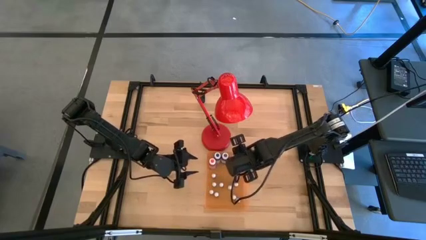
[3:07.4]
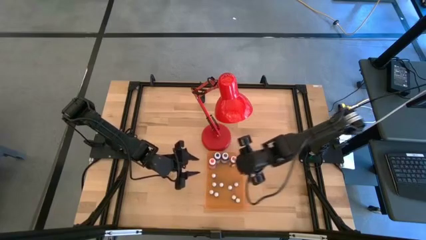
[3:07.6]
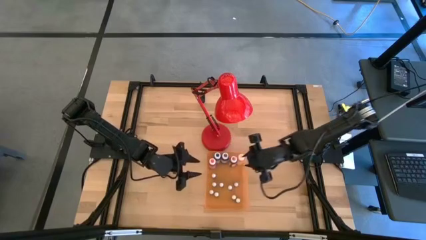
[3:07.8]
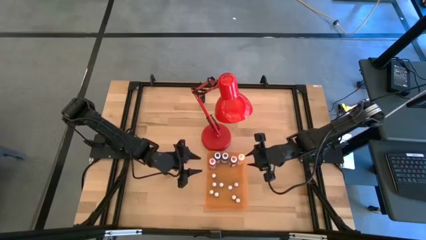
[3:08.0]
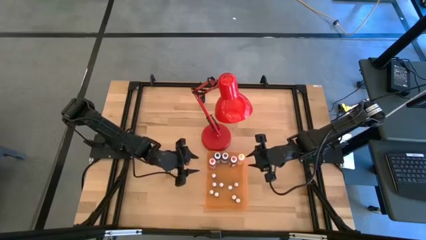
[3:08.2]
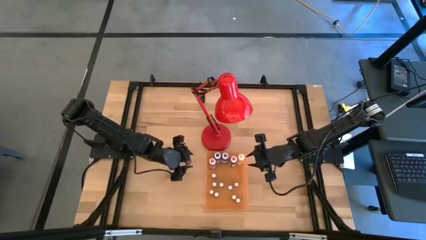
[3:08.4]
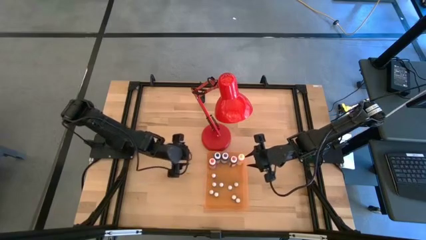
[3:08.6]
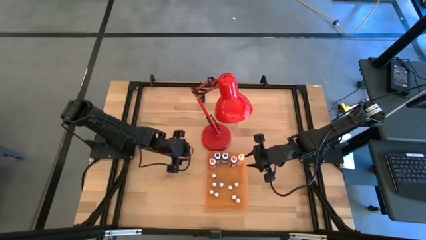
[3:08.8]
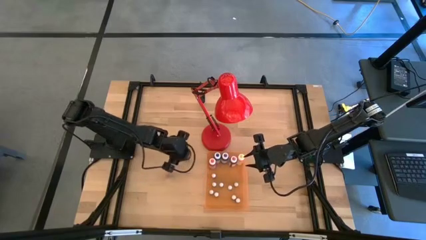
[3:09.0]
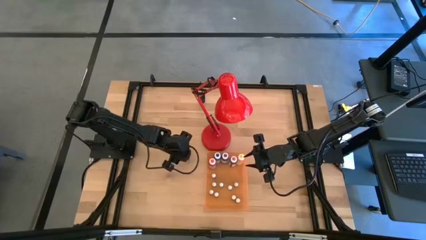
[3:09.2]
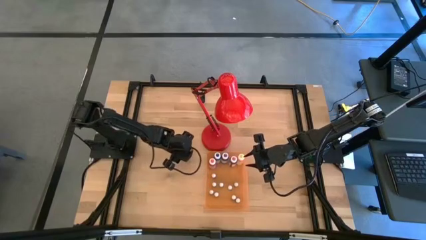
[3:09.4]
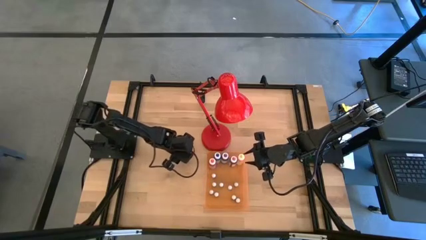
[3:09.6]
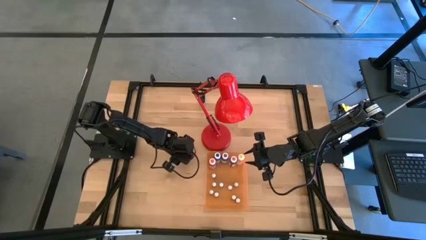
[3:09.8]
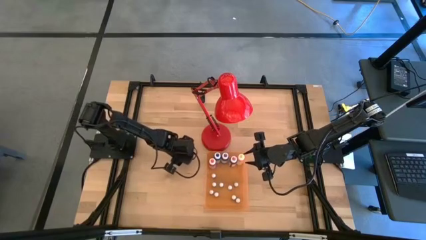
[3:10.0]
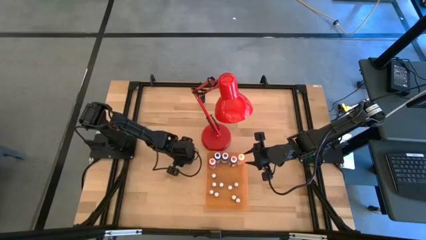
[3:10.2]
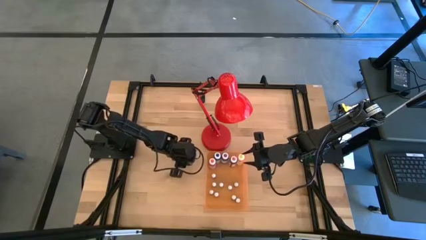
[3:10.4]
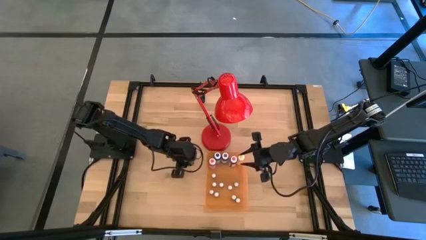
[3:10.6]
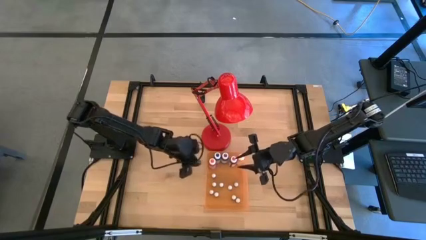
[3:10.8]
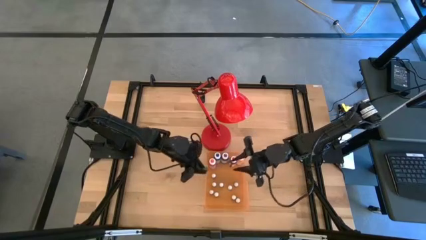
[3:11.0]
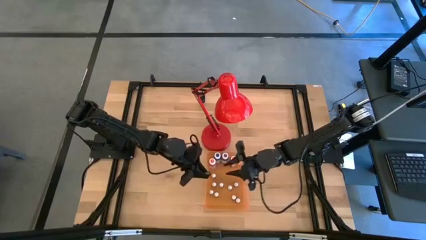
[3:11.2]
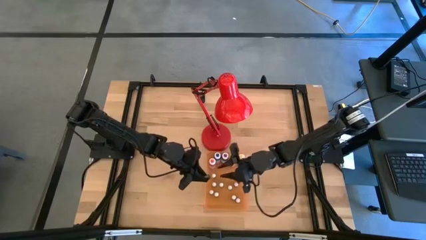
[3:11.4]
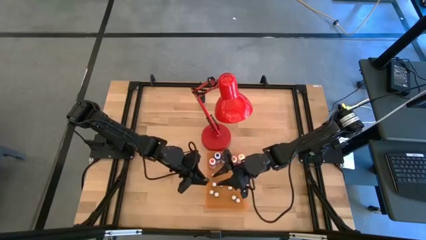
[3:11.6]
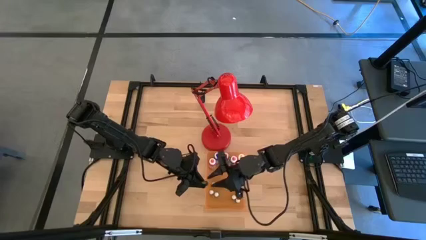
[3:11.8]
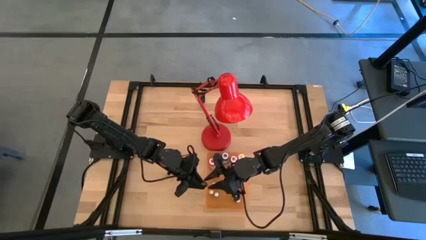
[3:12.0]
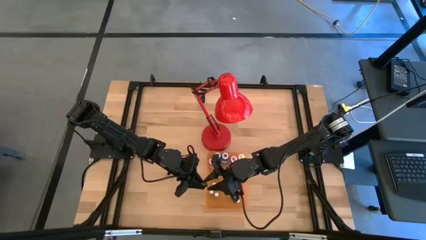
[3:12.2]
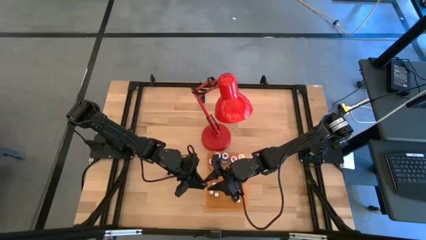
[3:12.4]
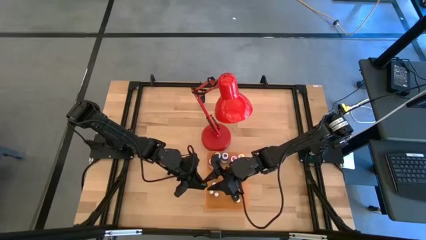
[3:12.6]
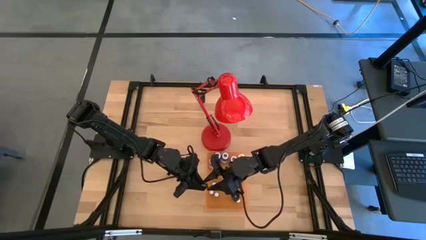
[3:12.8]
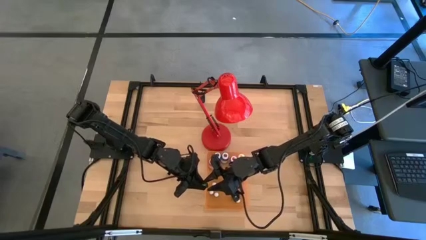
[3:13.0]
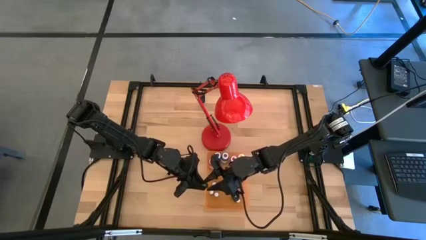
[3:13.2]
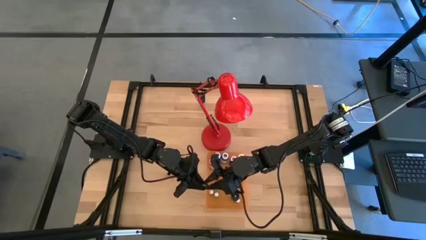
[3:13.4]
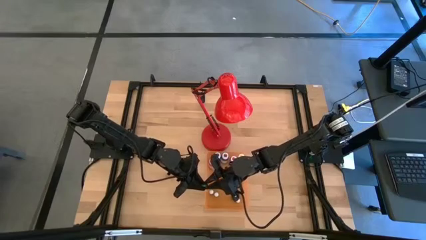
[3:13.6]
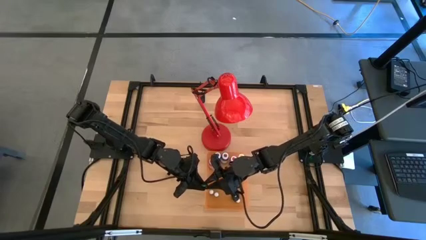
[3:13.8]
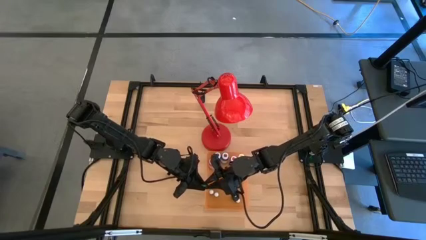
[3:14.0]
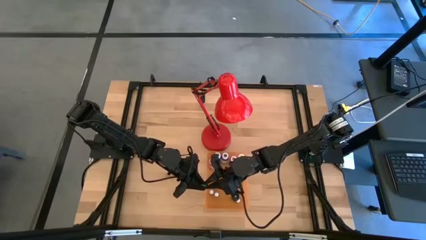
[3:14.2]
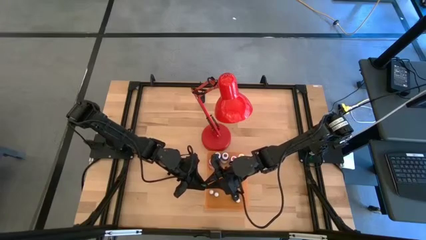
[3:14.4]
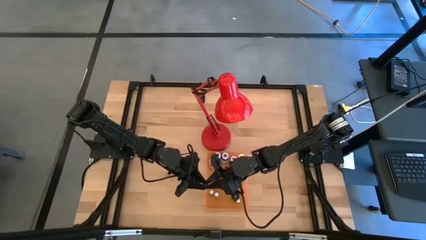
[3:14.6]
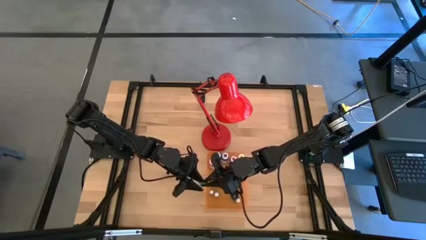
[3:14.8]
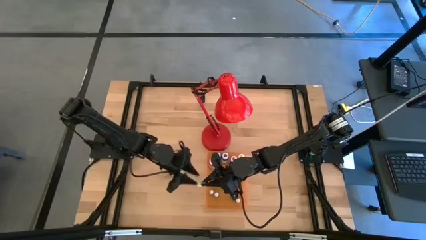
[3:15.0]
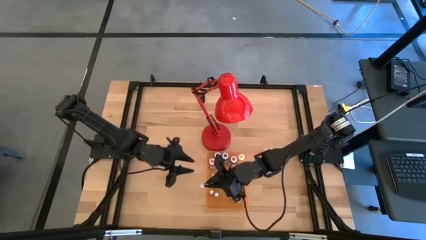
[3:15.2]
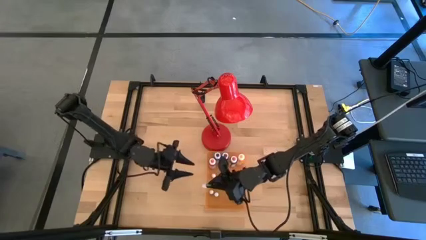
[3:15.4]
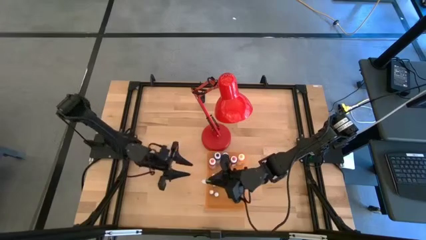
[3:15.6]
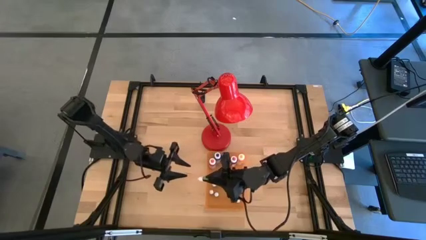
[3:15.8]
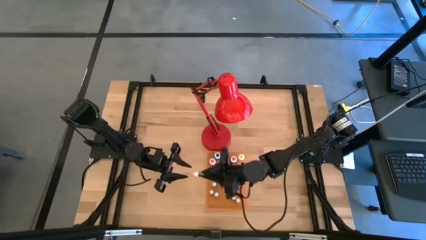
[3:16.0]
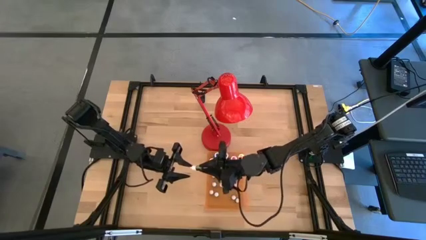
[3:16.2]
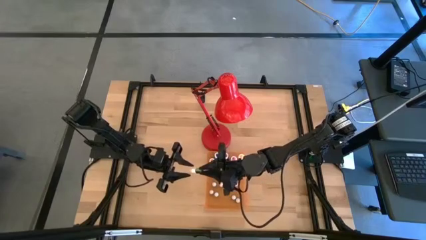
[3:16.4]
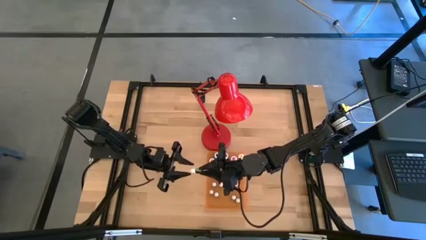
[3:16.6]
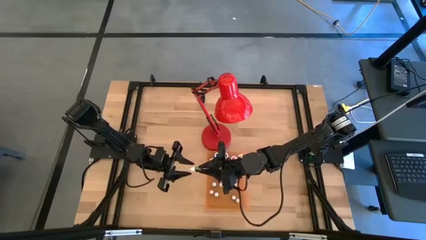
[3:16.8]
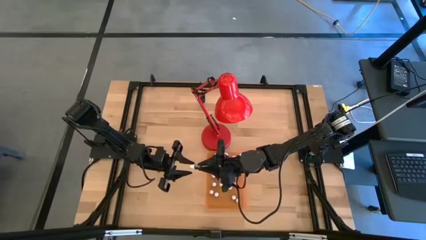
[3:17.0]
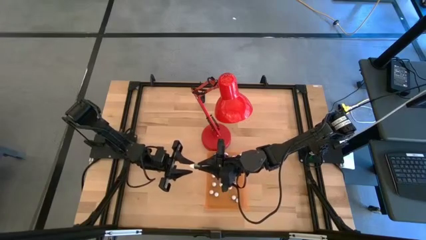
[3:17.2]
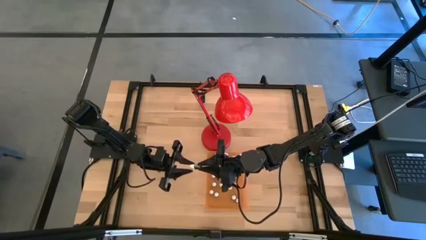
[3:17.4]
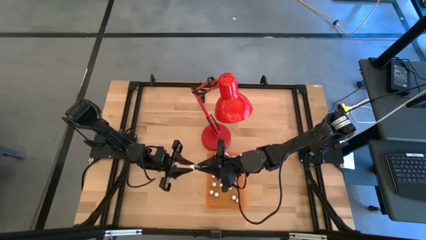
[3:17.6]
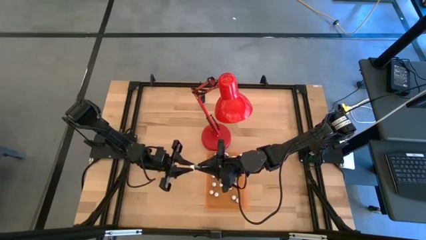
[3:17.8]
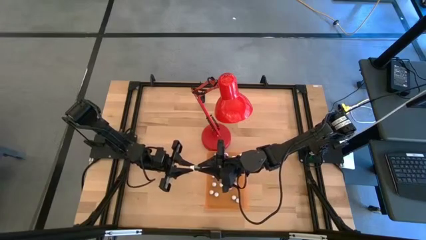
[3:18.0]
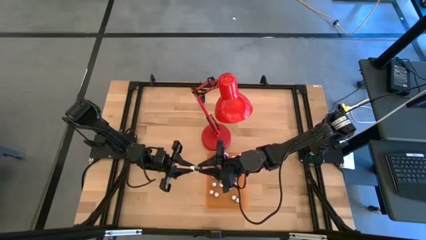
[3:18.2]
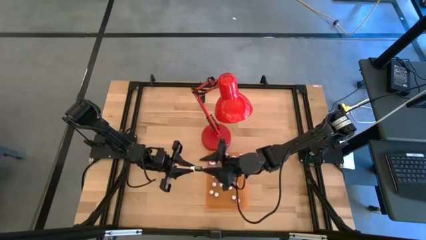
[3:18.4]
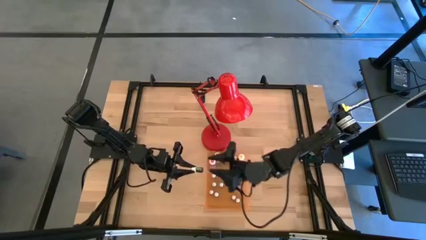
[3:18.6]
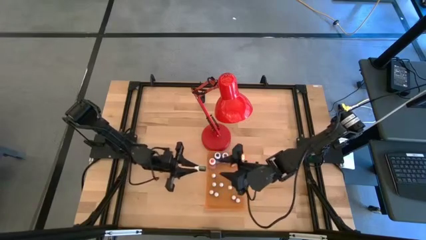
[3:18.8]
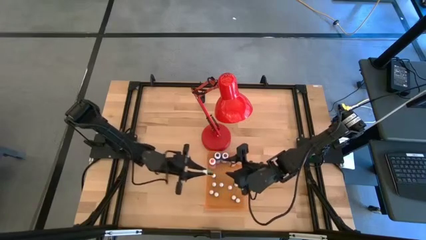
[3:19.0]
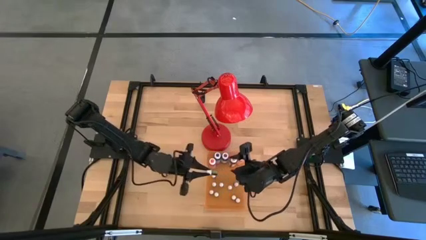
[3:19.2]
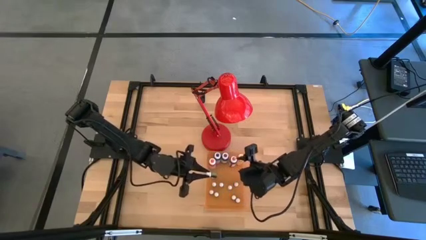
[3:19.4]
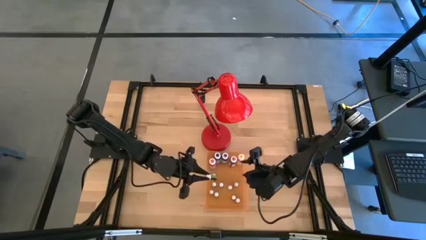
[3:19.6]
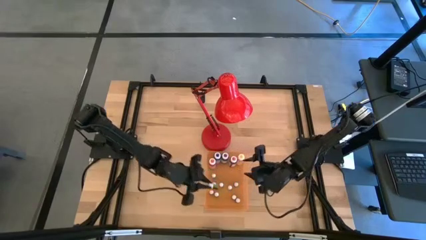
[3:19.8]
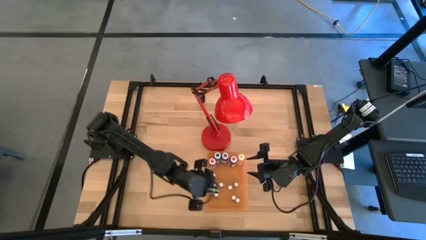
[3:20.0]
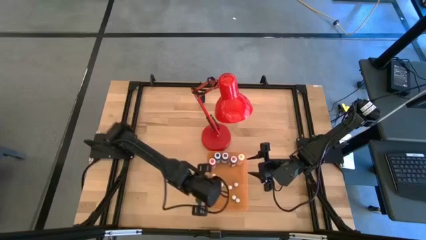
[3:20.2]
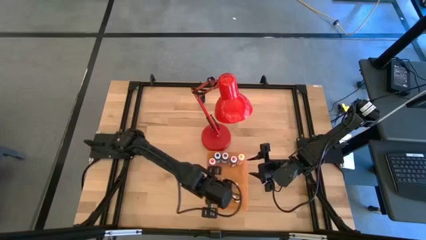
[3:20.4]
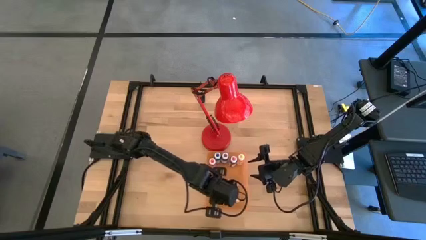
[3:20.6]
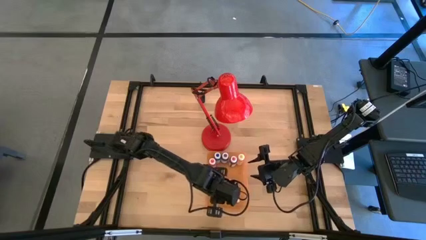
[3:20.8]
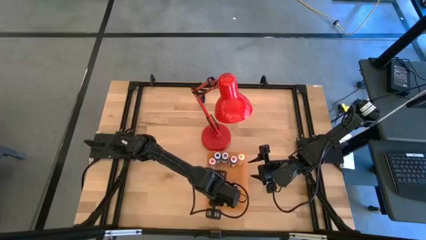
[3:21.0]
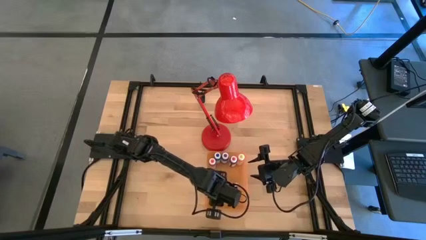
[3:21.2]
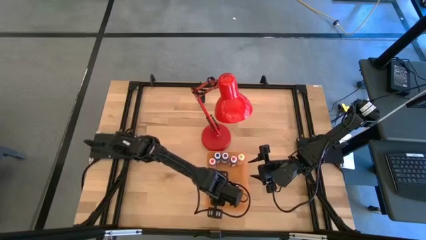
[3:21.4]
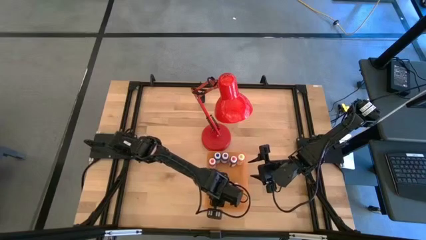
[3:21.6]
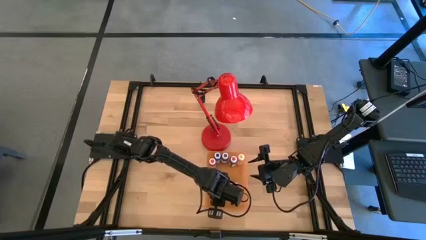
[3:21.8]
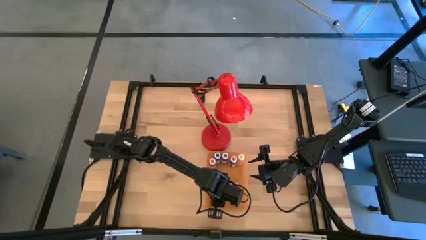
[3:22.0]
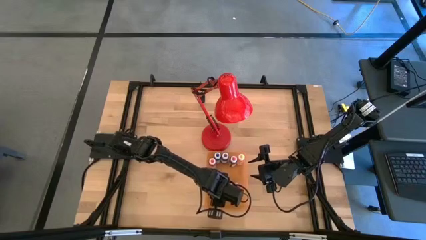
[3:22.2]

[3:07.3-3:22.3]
Task: Pick & Place food coloring
Put the green food coloring bottle into the orange bin
